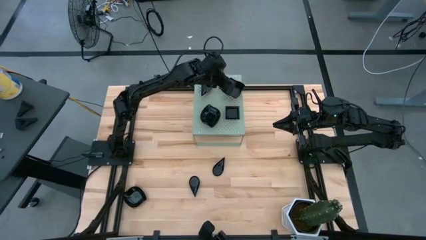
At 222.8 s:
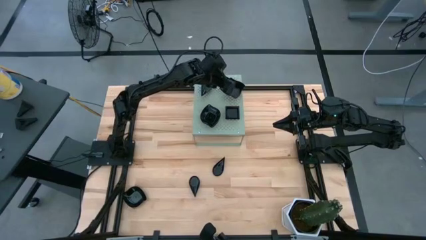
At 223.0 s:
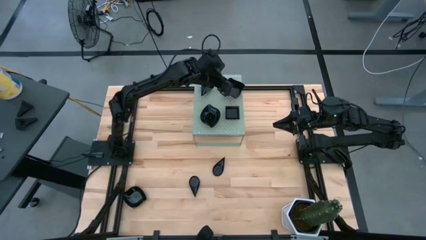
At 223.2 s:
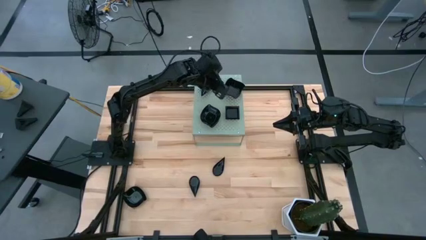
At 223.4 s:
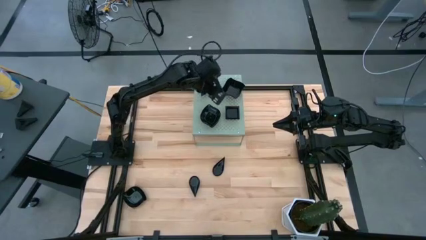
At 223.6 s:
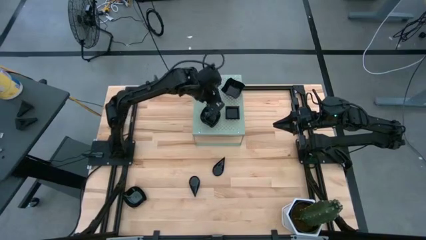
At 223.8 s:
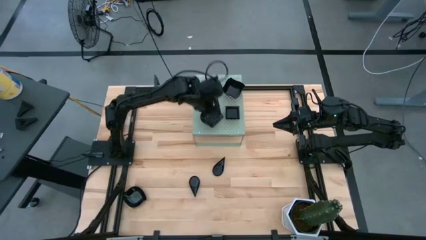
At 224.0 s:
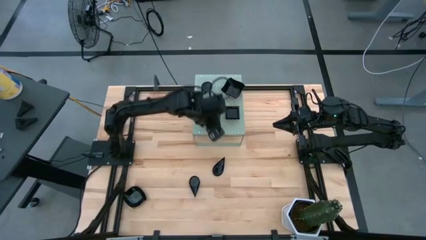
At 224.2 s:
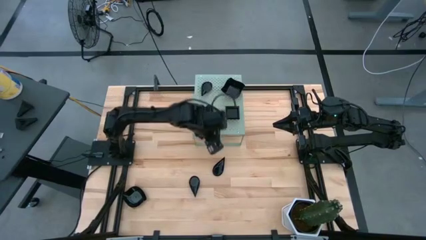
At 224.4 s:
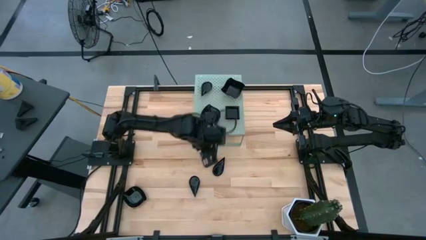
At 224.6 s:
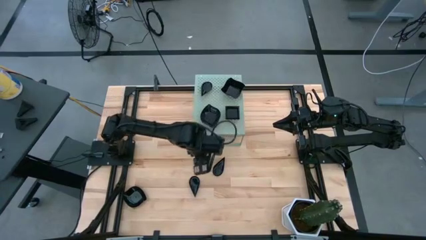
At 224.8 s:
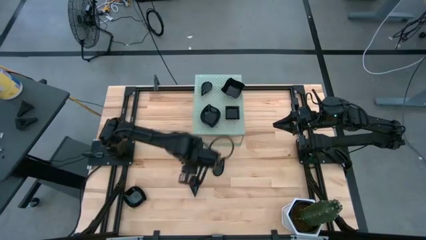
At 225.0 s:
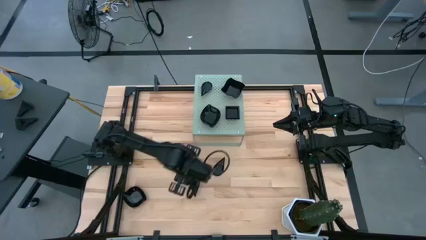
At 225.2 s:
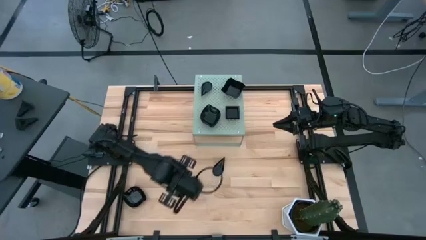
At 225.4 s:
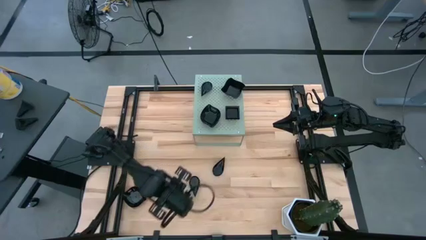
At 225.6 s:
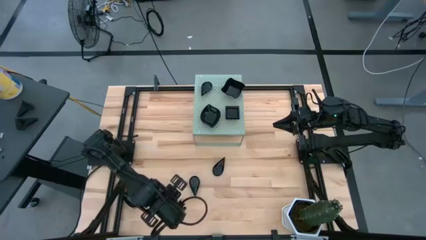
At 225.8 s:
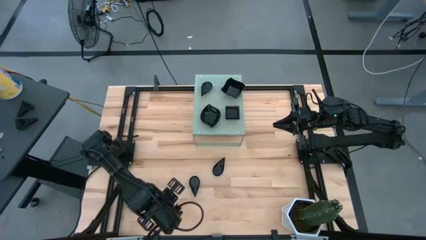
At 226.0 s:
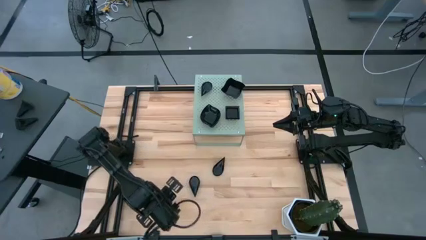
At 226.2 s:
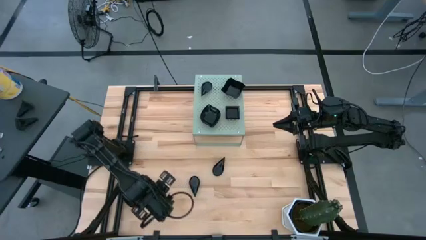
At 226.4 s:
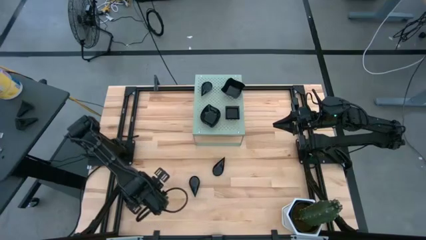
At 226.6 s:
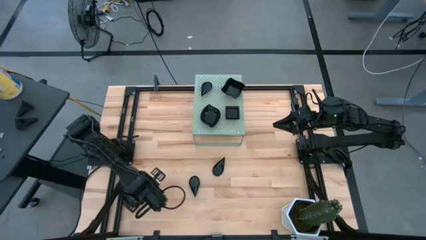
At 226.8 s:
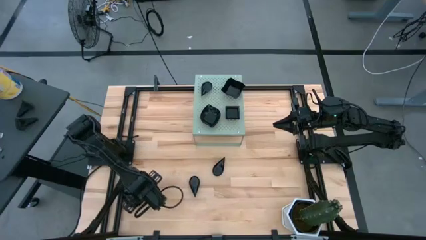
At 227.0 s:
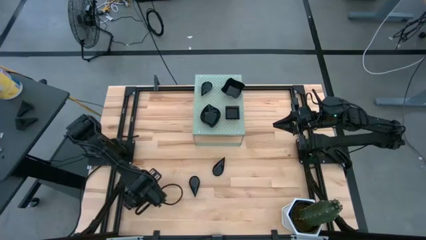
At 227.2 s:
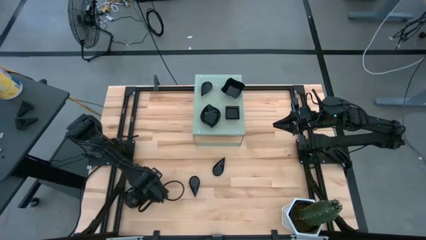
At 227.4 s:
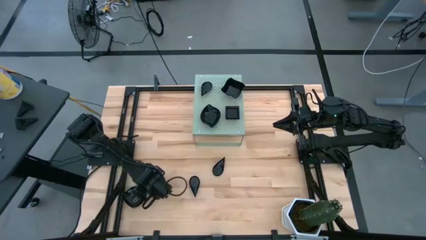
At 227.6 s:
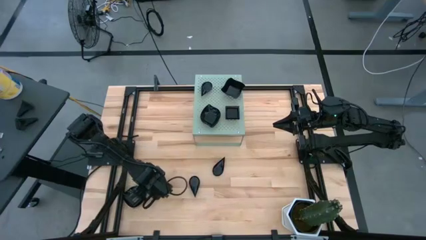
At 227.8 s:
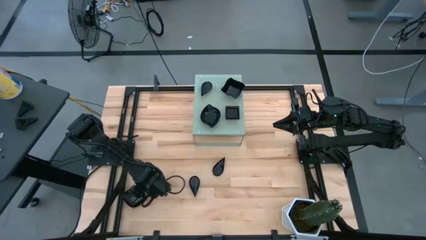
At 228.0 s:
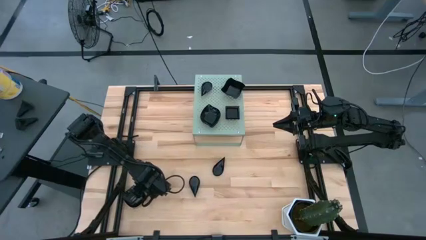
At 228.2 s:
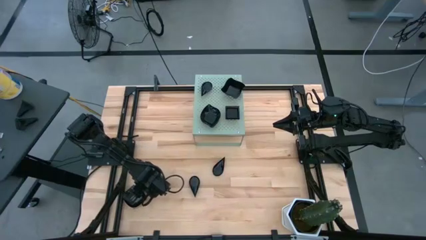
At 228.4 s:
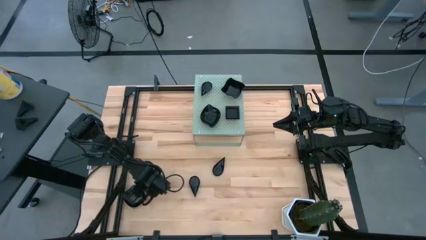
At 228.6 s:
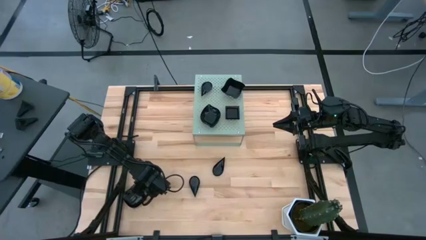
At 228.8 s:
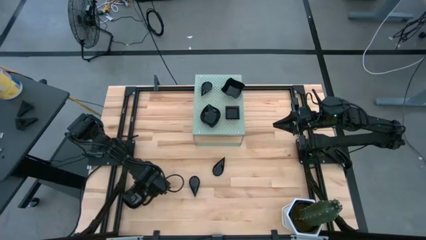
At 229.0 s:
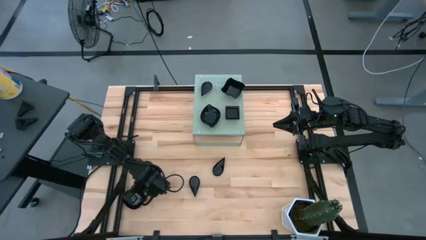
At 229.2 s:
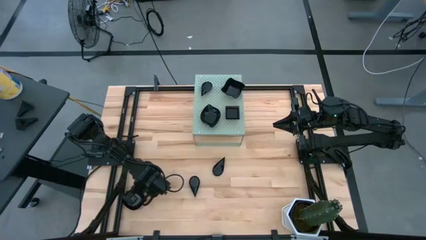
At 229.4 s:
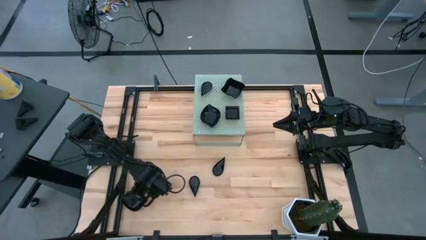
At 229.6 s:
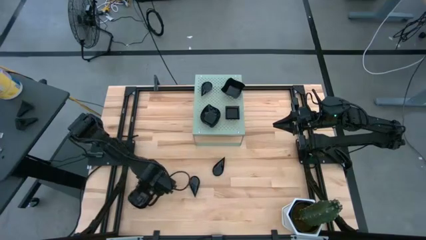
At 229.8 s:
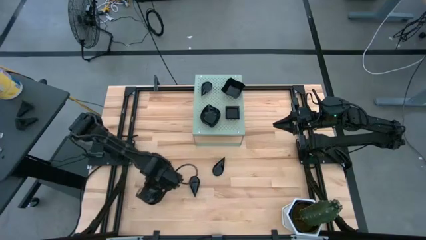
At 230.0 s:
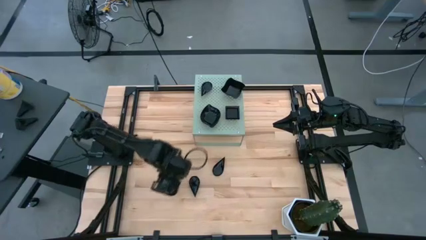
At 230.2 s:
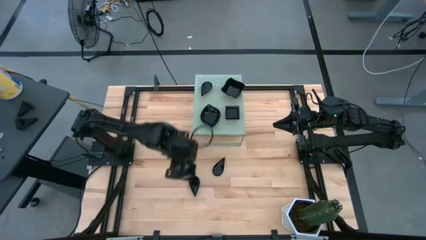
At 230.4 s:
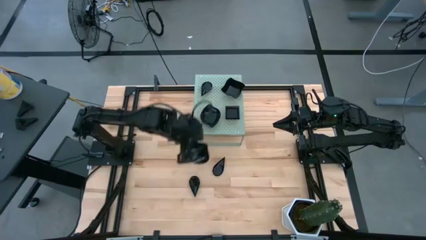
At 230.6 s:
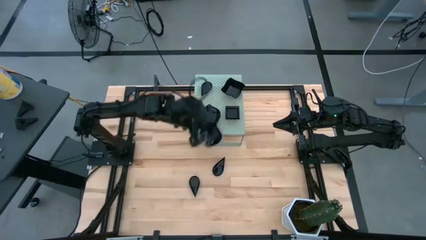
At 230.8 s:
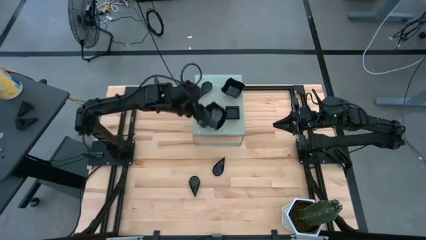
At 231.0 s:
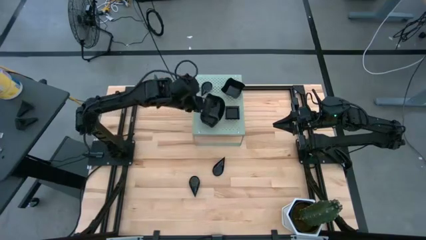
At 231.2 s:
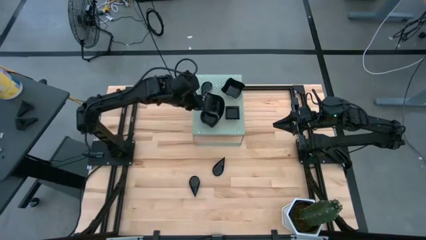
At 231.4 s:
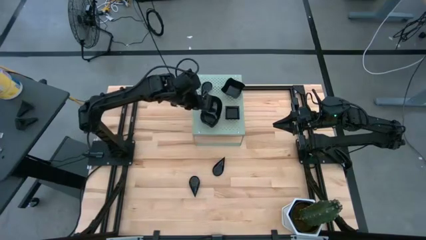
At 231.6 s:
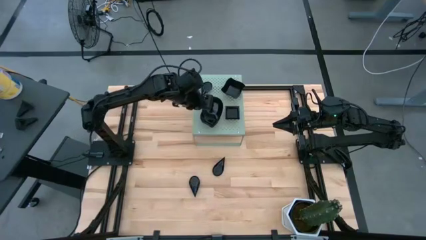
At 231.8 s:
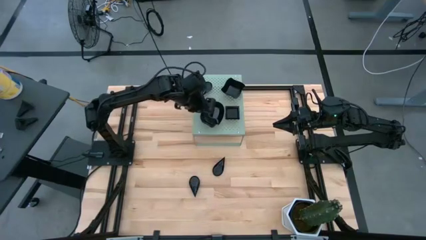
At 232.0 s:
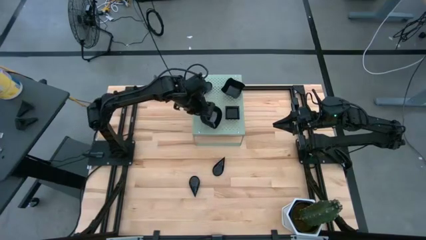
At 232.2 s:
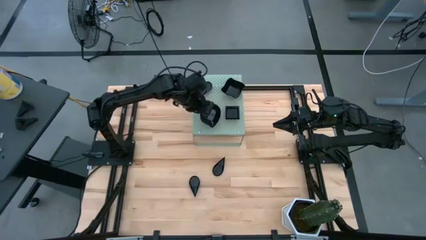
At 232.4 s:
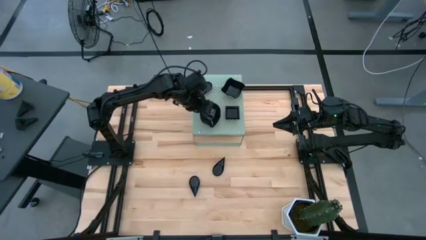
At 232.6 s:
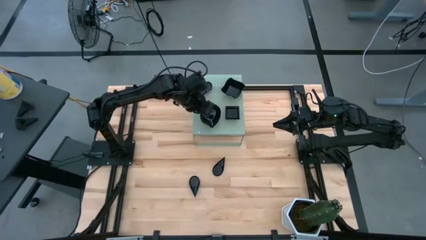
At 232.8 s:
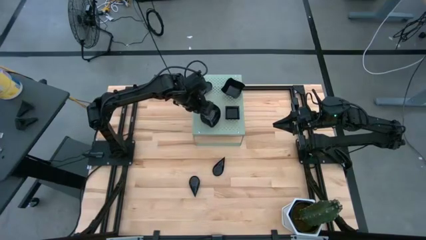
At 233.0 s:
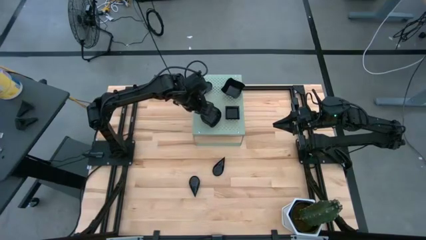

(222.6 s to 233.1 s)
Task: Pick & Place Mini shaped plates
Stack the leaf shaped plate on top of the leaf shaped plates on the shelf

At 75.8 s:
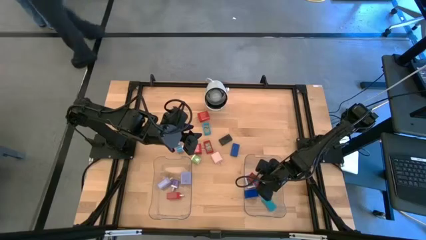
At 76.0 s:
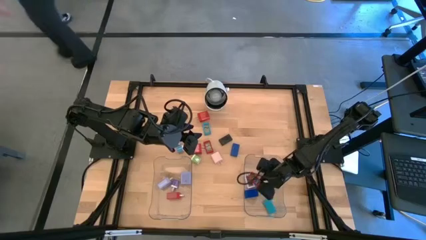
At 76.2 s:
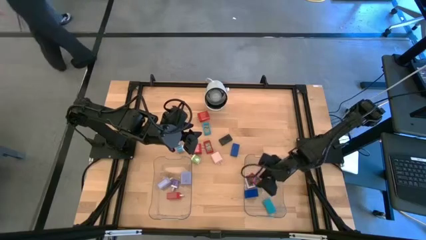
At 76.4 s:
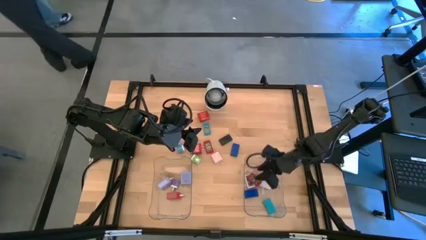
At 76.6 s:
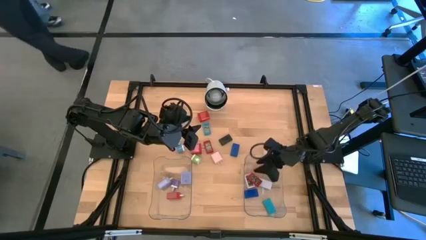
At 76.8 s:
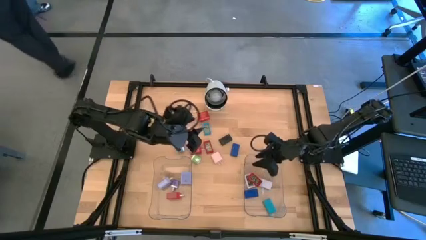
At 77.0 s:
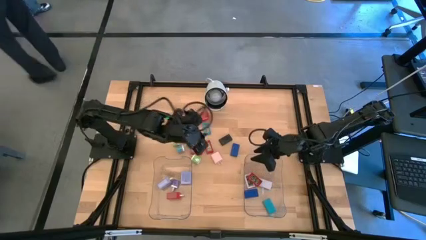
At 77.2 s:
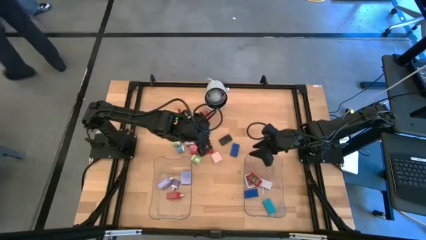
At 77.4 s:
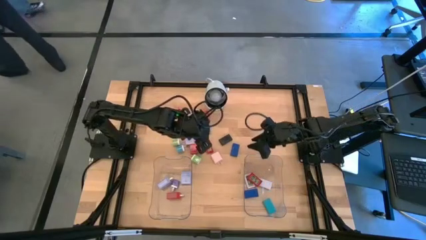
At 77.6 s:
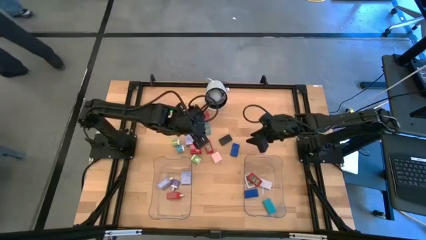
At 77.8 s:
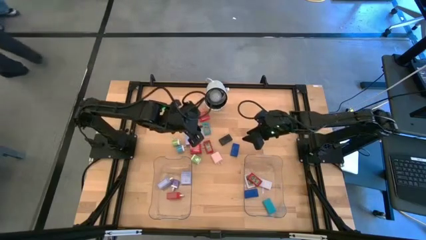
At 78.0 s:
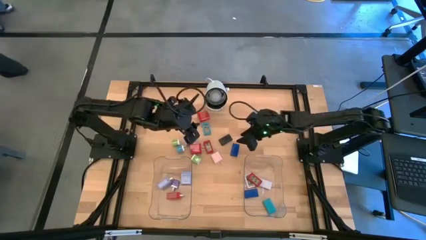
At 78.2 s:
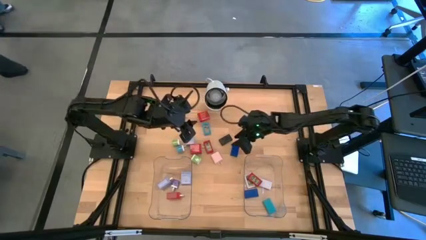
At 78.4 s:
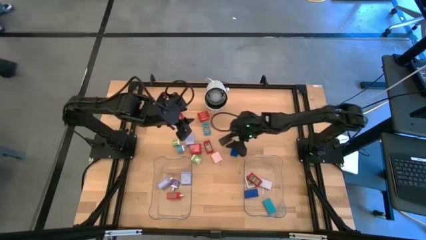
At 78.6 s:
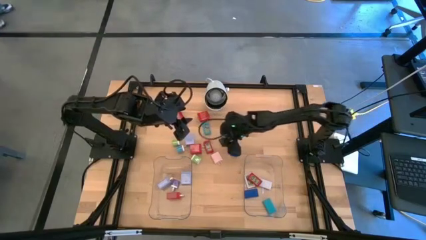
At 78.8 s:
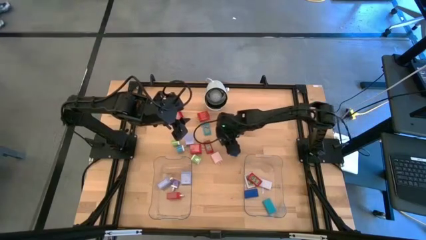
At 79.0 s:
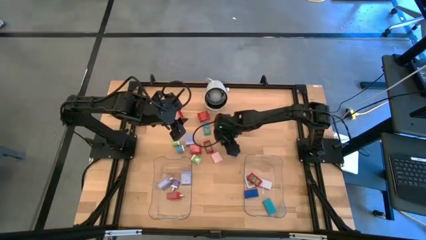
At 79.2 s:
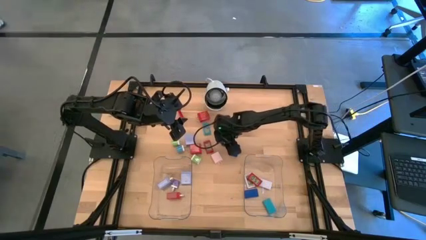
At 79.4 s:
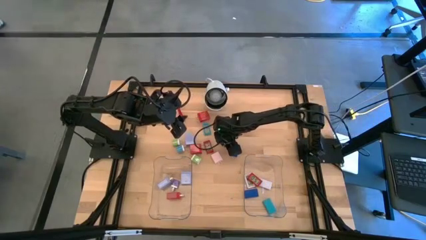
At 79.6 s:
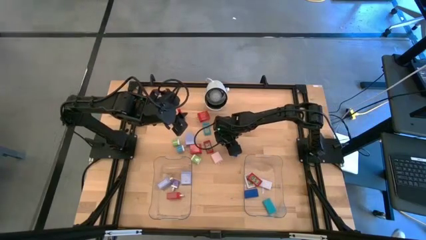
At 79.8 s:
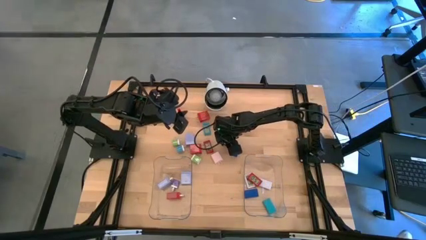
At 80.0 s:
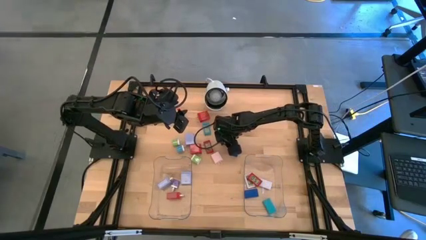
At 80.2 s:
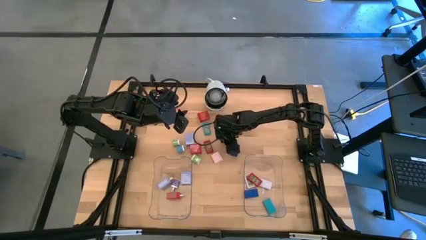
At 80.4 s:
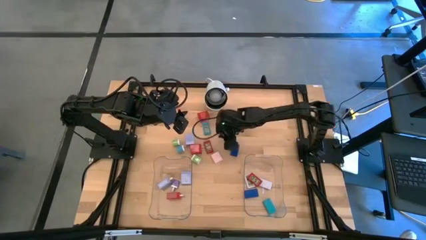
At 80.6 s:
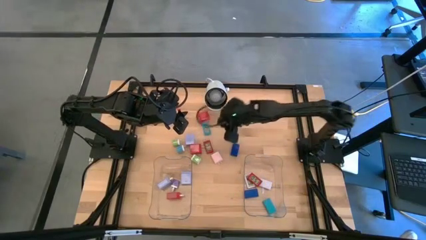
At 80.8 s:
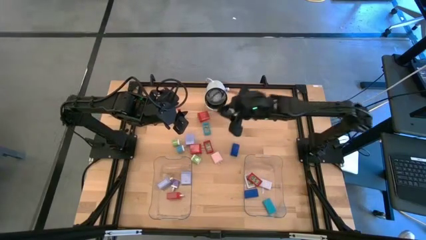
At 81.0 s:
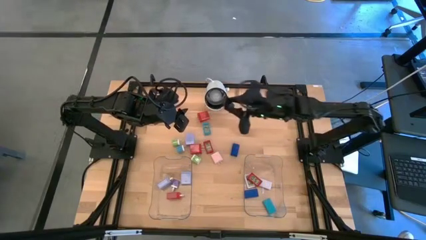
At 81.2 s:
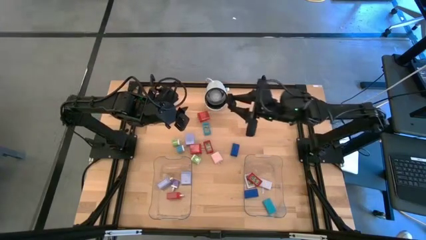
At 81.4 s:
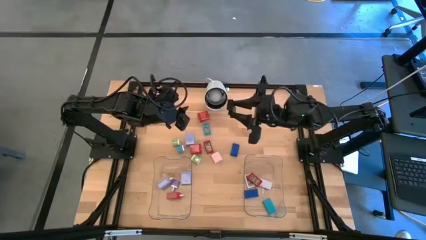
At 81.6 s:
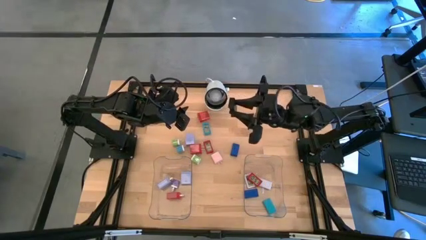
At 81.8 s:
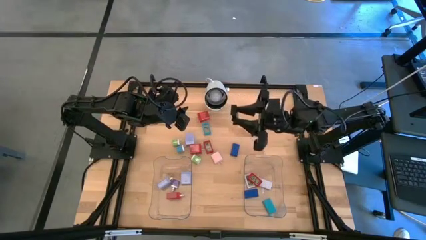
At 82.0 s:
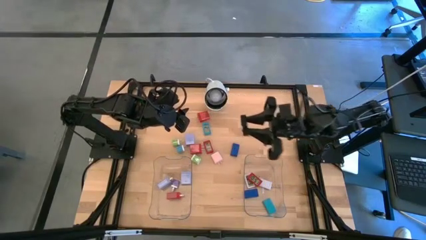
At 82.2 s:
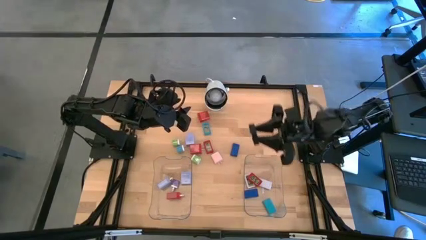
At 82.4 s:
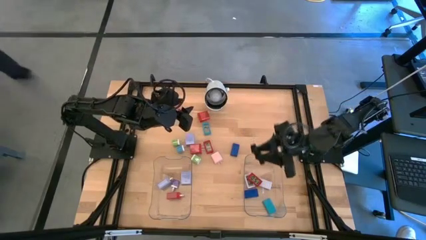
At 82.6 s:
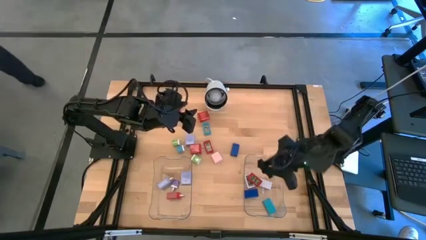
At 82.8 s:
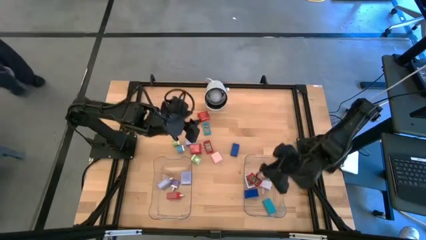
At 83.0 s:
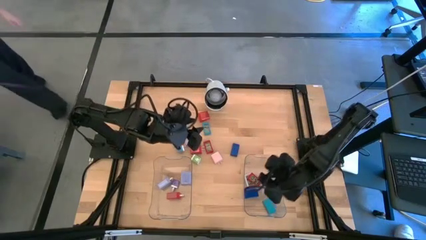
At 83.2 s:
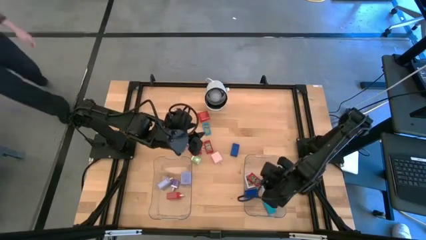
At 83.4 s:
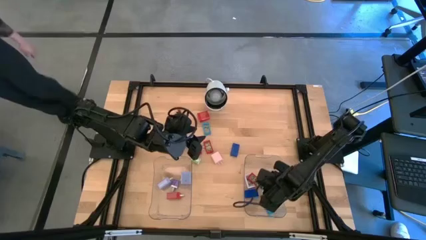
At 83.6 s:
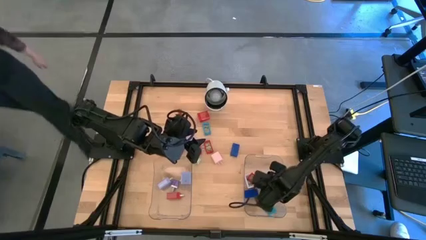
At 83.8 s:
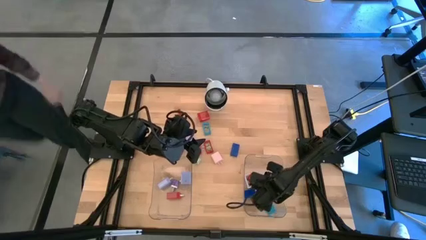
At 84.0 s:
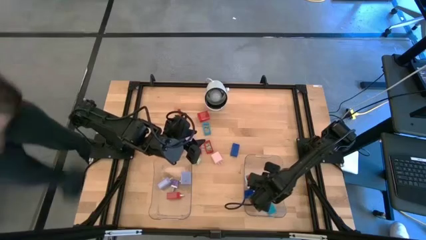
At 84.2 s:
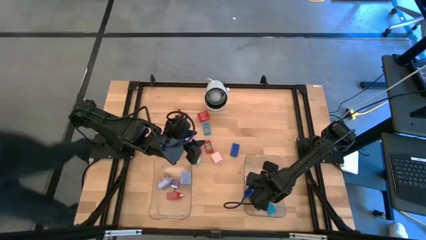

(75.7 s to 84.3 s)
Task: Pick & Place Office items
Put the black timer into the right transparent bin
